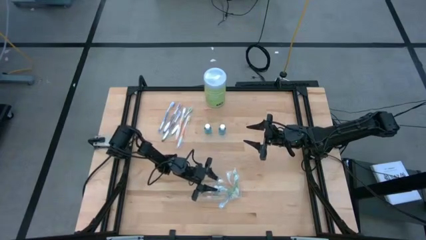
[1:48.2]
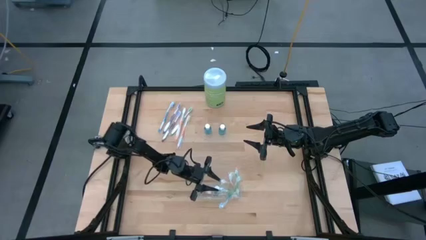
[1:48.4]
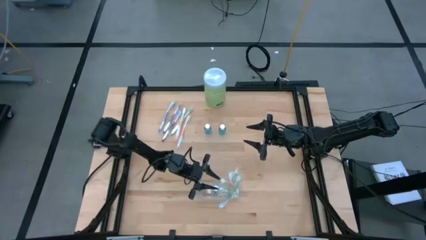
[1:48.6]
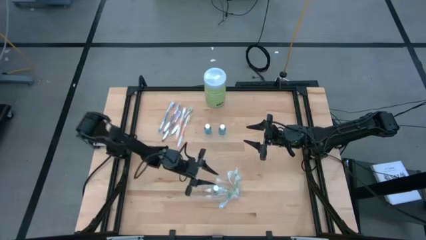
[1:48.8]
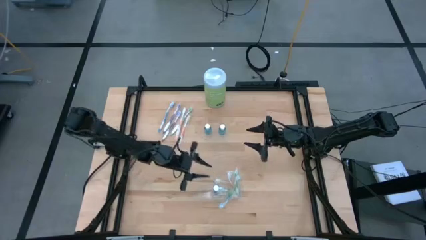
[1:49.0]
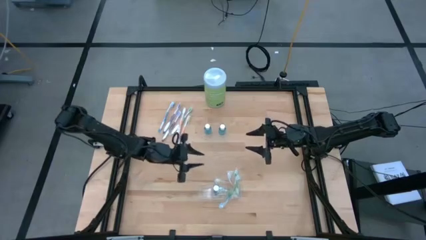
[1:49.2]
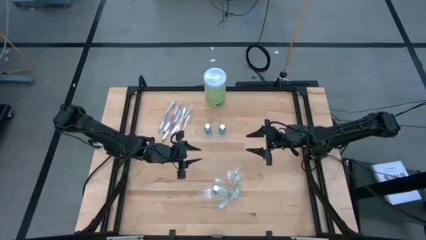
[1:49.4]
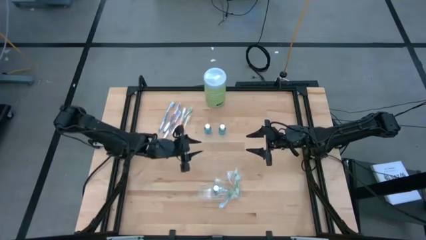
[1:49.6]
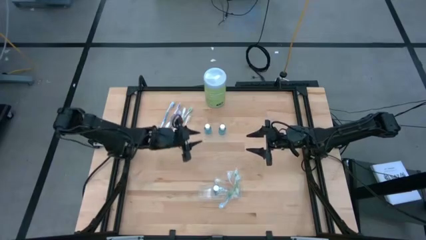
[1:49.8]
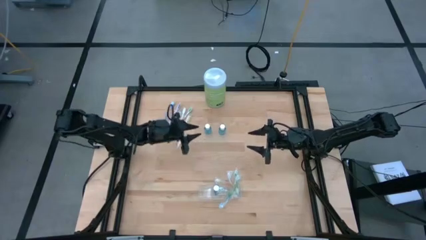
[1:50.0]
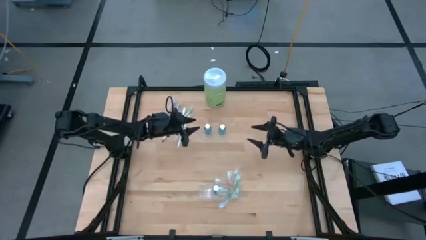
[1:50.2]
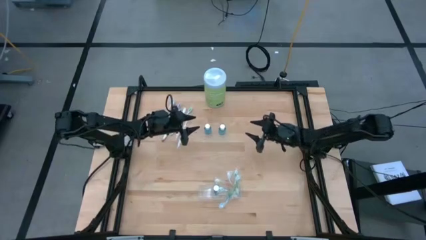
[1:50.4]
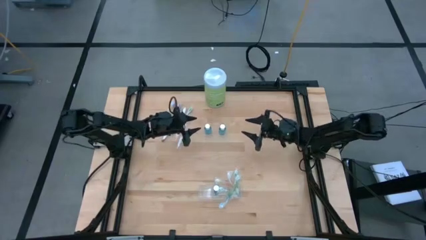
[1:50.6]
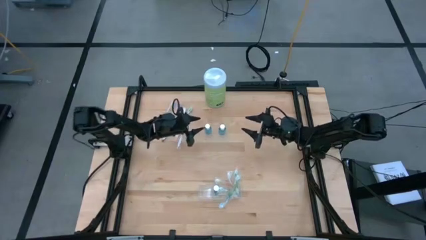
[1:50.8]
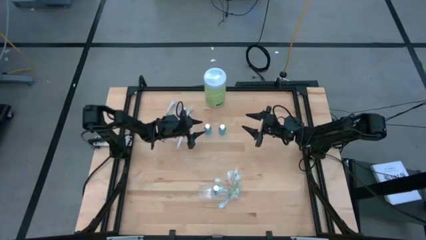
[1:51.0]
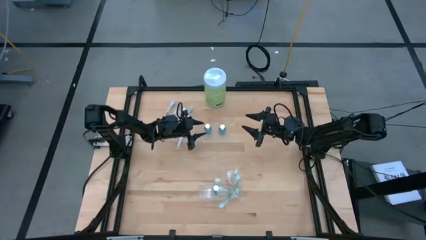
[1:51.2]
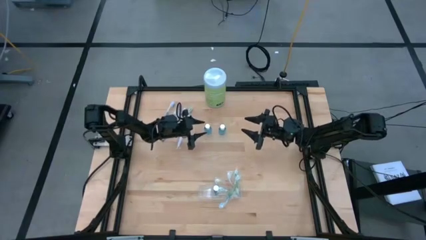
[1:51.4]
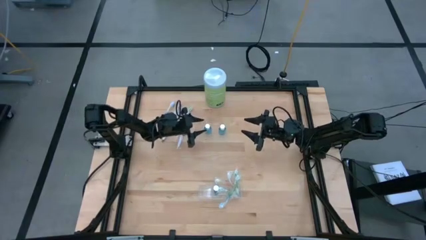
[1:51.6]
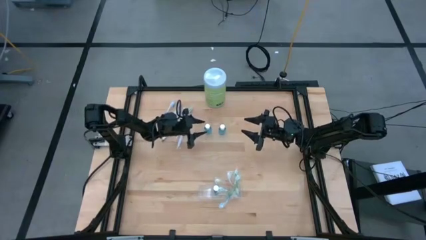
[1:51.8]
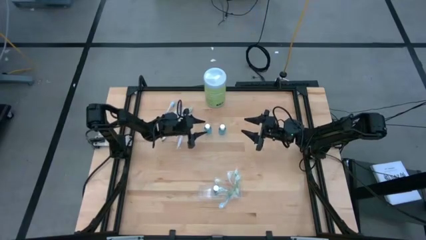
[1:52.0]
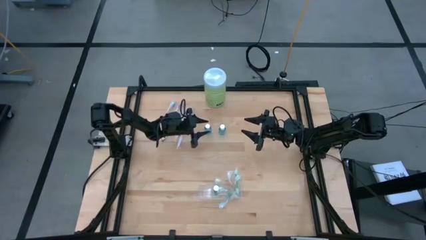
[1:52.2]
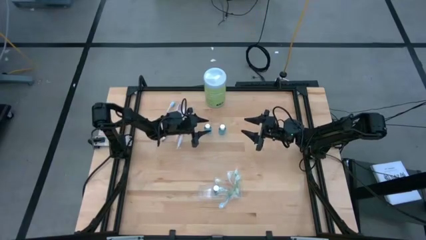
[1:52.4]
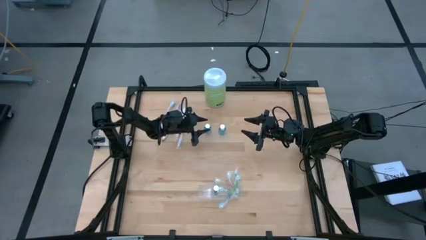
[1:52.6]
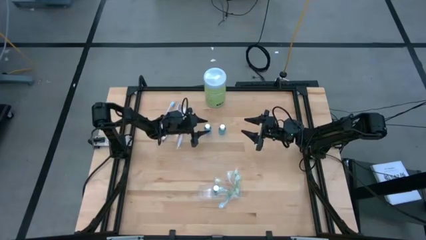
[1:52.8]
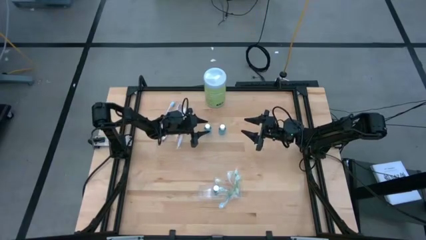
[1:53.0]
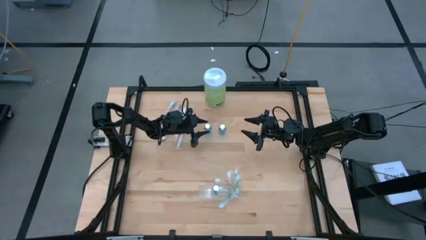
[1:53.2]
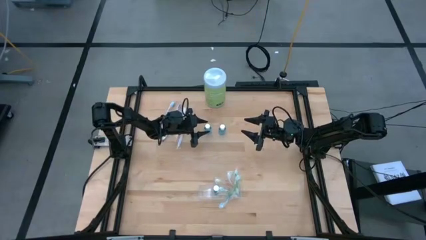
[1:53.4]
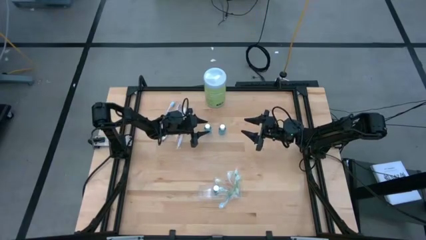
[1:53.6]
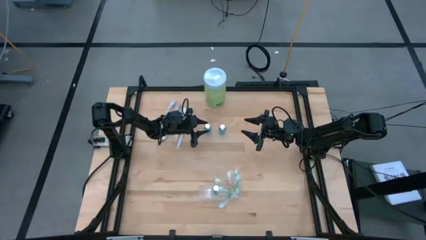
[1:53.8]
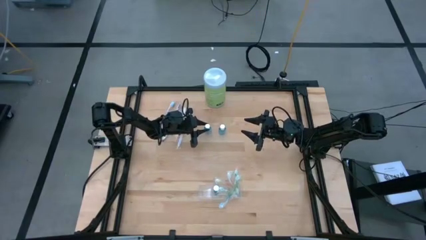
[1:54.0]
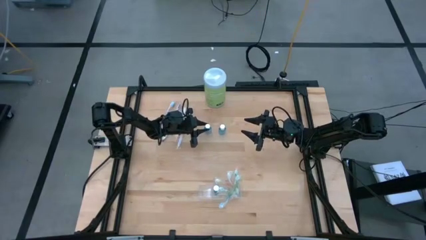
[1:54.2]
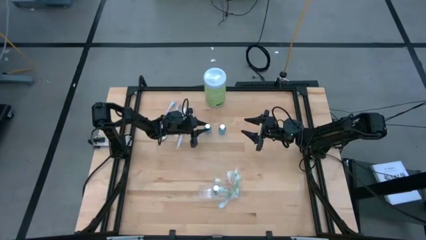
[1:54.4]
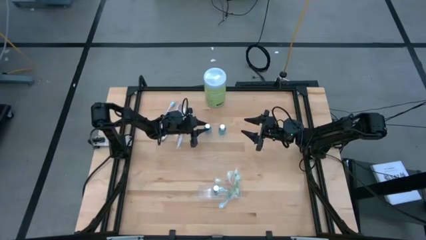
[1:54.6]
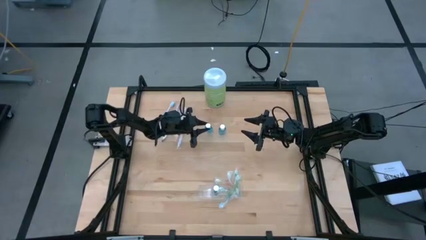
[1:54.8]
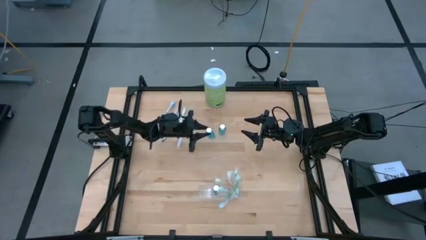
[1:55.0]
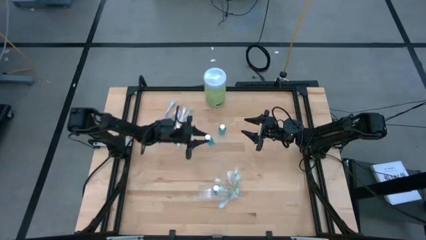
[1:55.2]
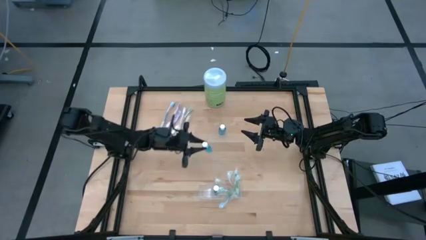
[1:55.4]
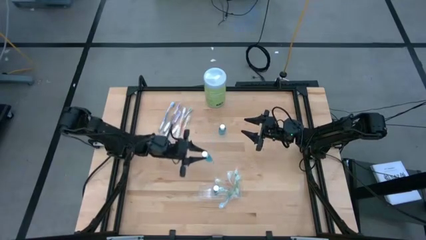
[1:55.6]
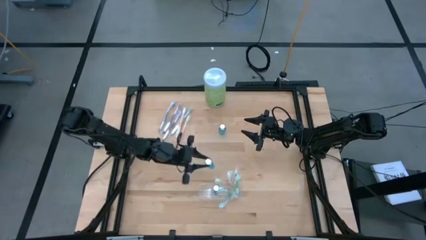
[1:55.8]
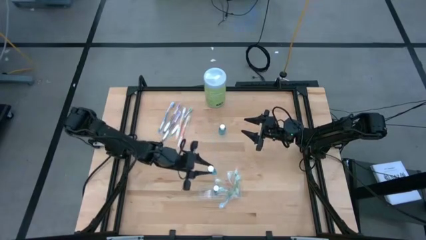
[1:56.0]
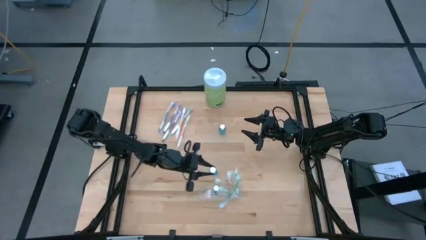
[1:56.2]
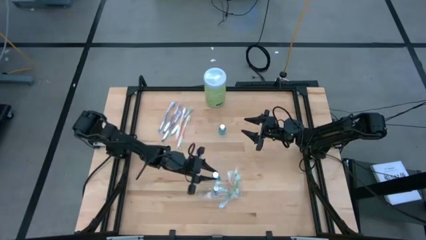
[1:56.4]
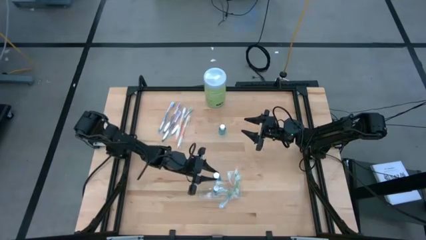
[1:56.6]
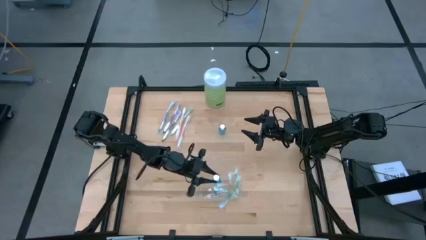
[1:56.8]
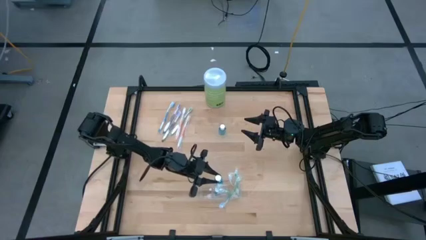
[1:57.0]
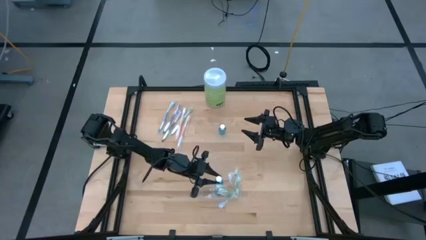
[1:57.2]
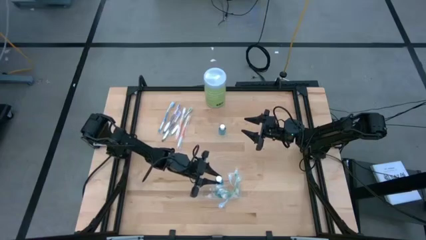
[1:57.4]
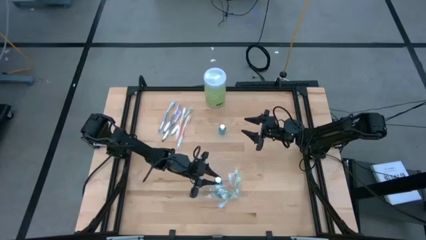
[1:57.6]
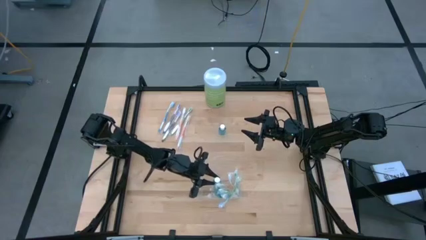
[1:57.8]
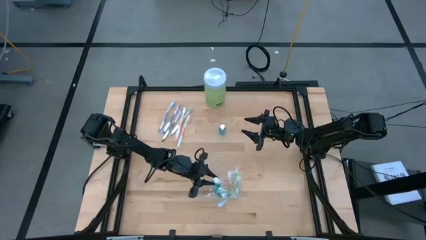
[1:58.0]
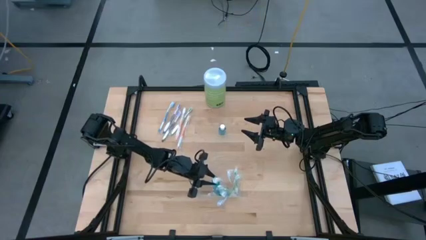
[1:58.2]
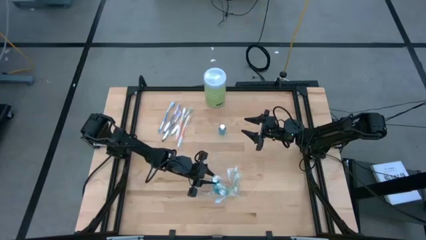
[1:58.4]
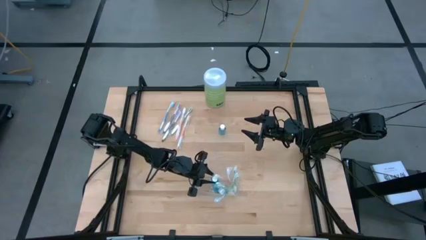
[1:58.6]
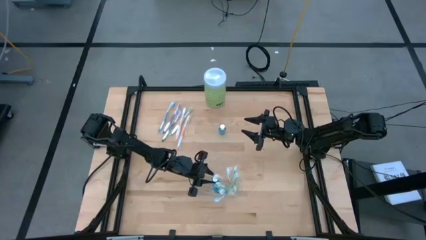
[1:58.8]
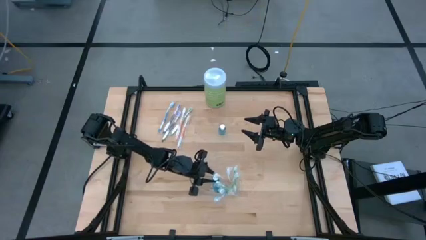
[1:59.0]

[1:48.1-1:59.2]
Task: Pick & Place toothbrushing station
Put the mouthwash into the transparent organizer

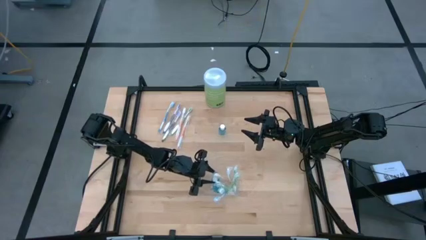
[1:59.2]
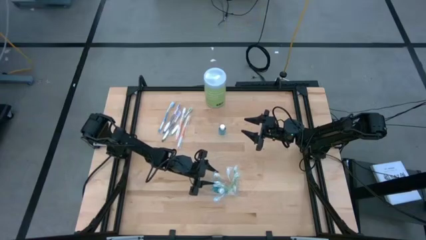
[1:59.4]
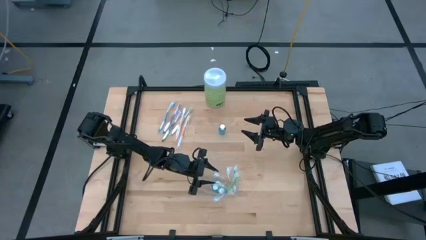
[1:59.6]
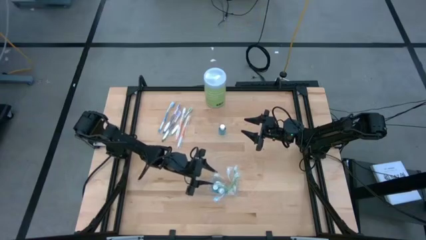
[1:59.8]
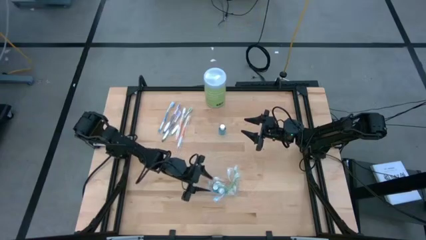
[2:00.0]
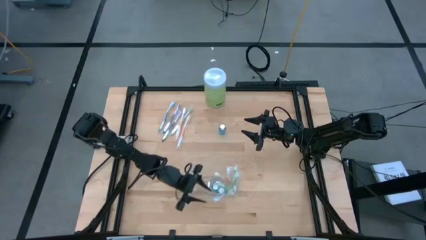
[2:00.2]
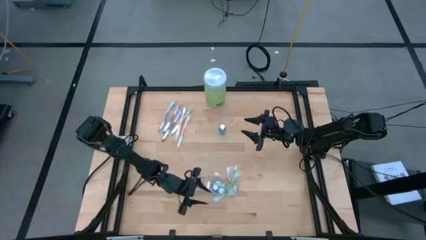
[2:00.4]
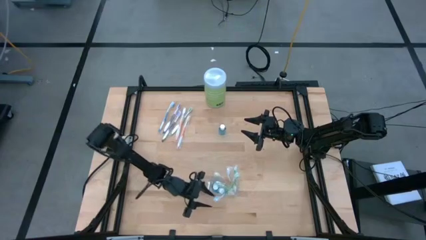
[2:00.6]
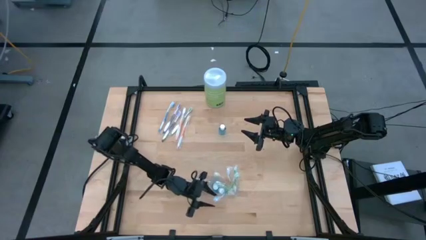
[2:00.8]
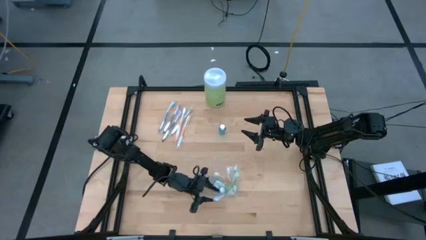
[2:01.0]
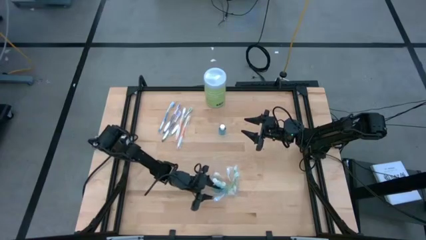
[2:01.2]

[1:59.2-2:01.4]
Adjust the mouthwashes
